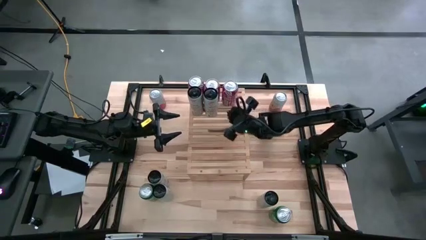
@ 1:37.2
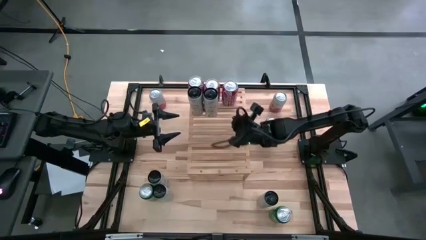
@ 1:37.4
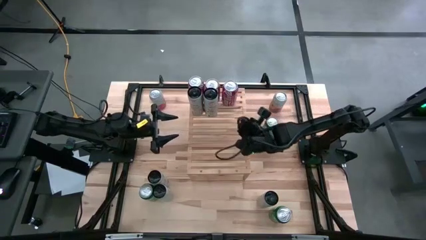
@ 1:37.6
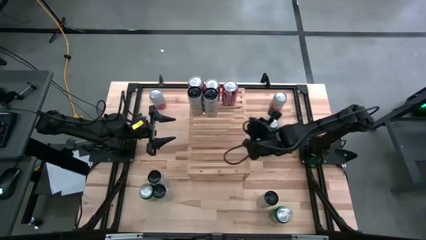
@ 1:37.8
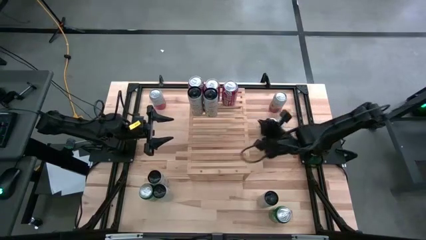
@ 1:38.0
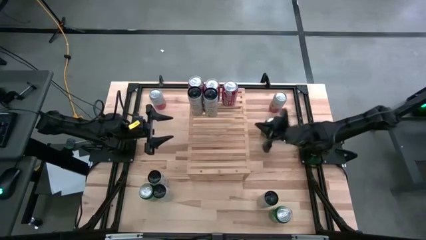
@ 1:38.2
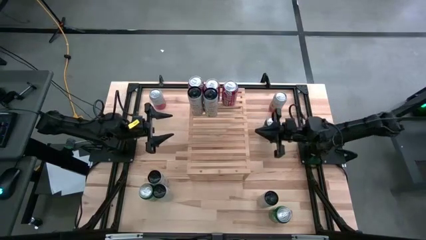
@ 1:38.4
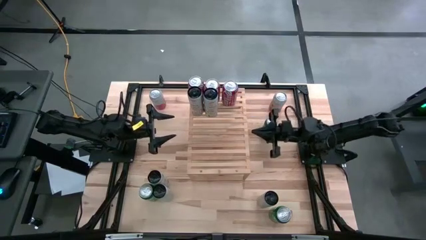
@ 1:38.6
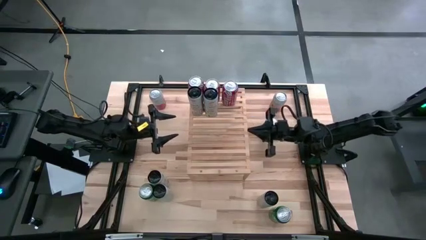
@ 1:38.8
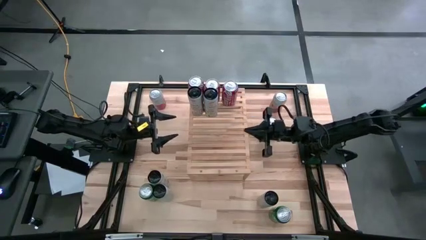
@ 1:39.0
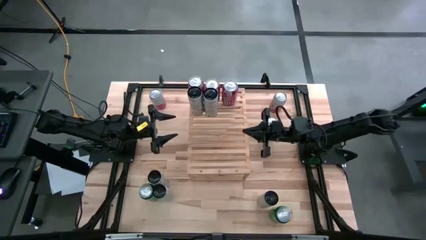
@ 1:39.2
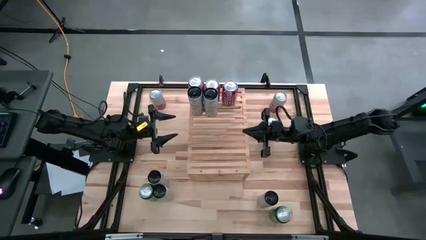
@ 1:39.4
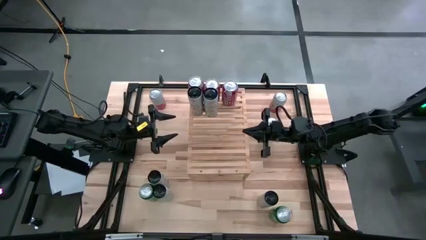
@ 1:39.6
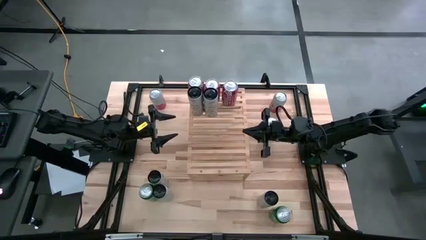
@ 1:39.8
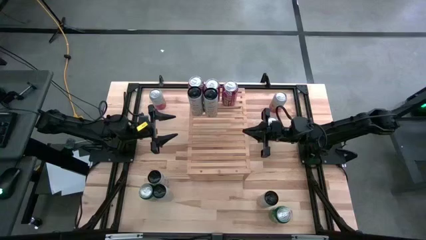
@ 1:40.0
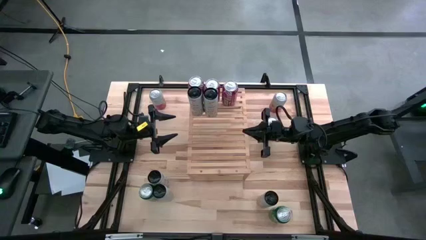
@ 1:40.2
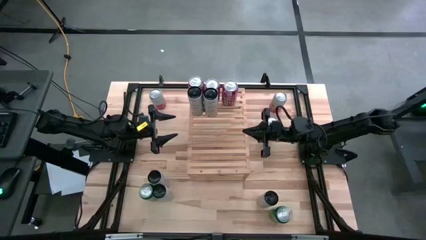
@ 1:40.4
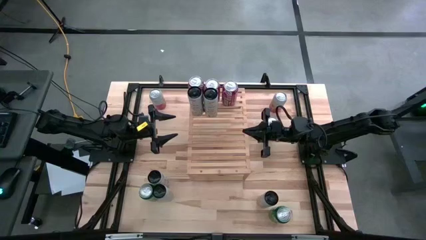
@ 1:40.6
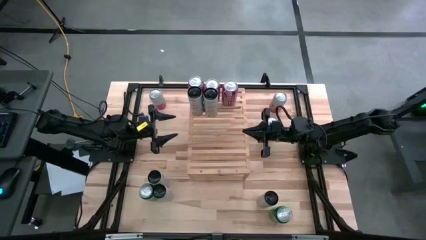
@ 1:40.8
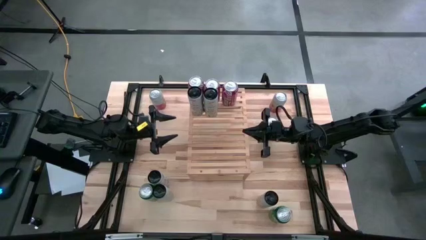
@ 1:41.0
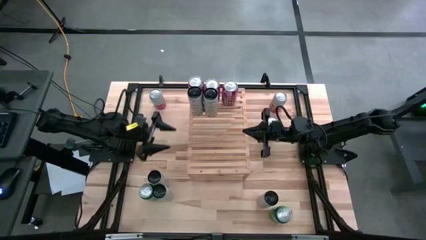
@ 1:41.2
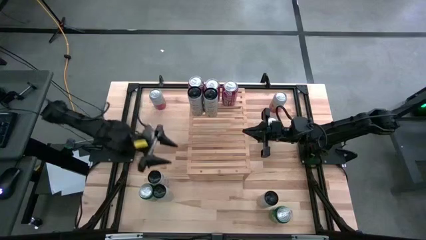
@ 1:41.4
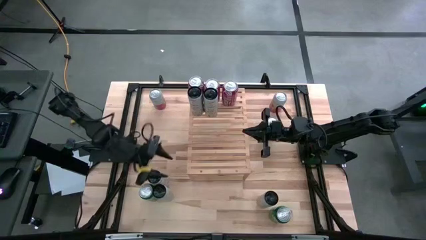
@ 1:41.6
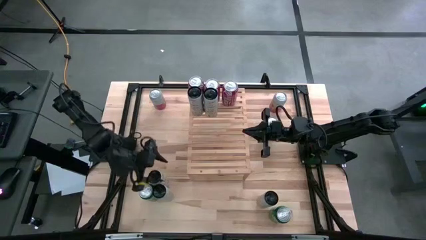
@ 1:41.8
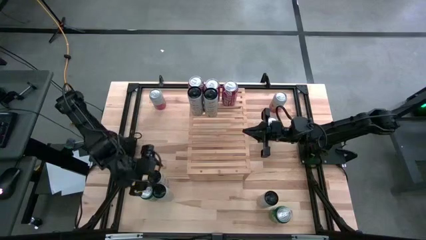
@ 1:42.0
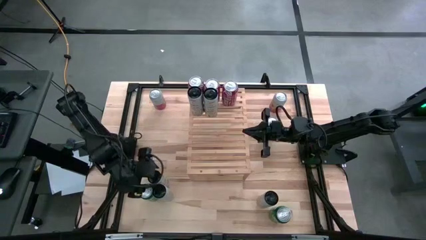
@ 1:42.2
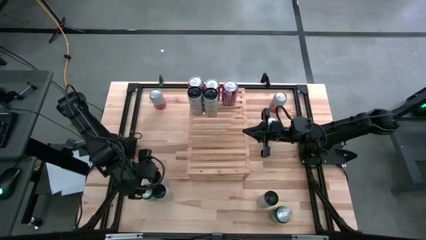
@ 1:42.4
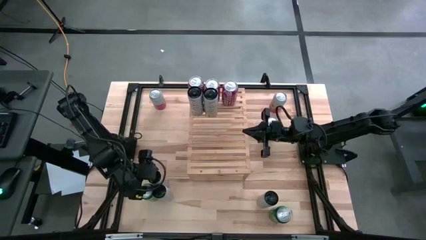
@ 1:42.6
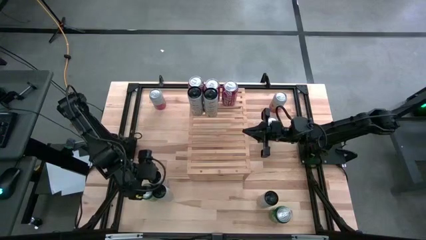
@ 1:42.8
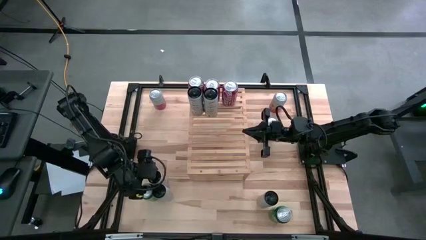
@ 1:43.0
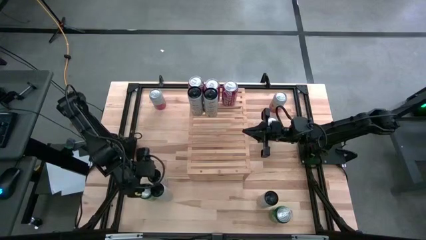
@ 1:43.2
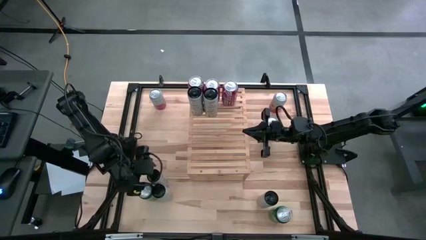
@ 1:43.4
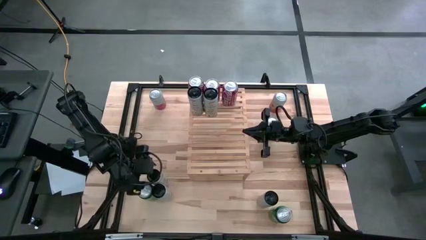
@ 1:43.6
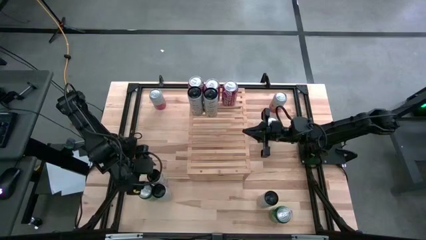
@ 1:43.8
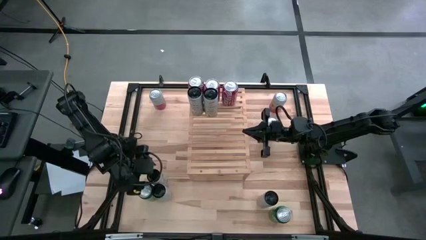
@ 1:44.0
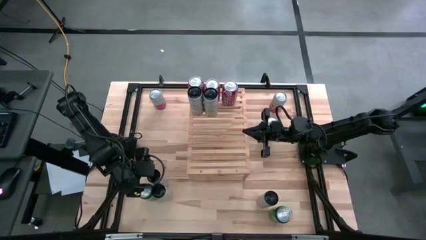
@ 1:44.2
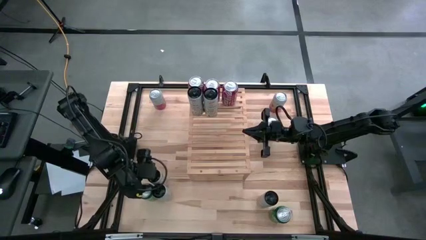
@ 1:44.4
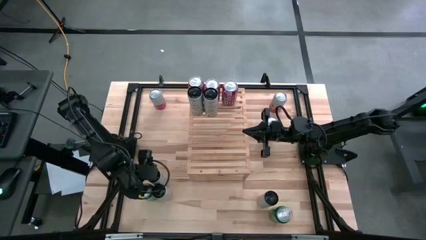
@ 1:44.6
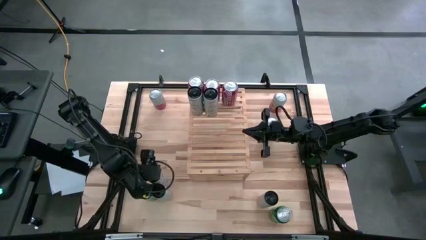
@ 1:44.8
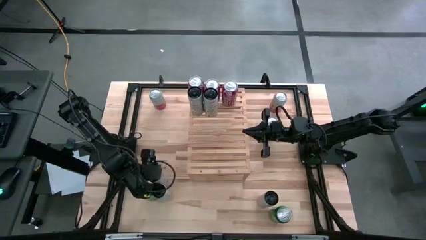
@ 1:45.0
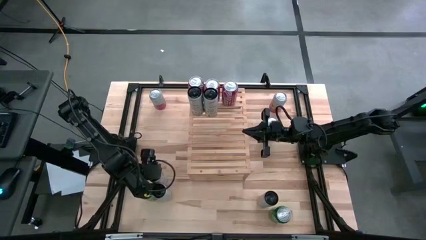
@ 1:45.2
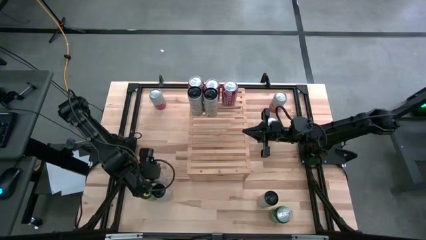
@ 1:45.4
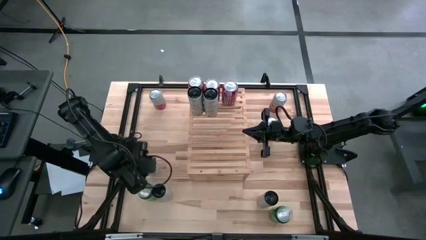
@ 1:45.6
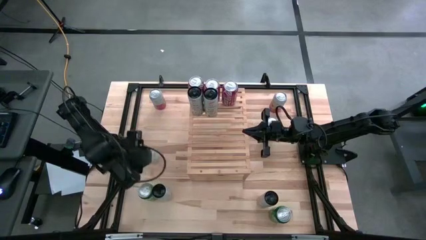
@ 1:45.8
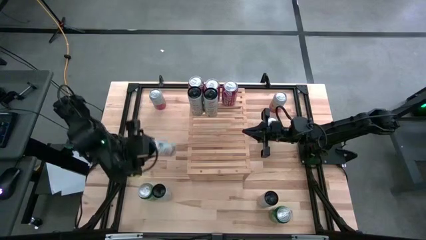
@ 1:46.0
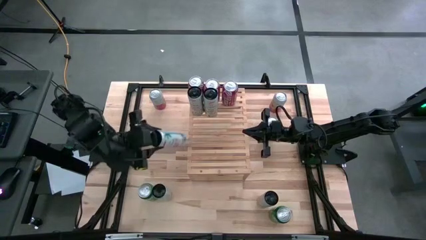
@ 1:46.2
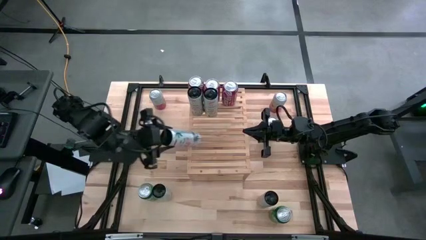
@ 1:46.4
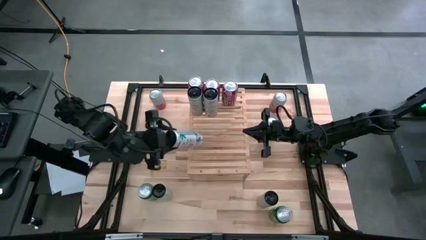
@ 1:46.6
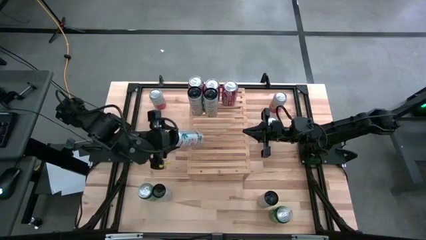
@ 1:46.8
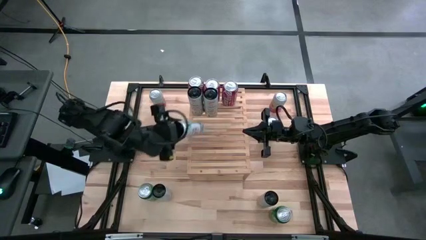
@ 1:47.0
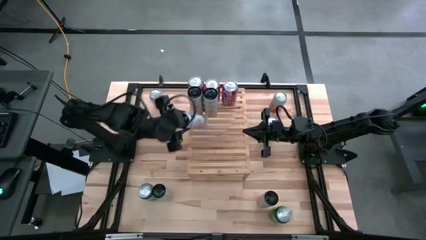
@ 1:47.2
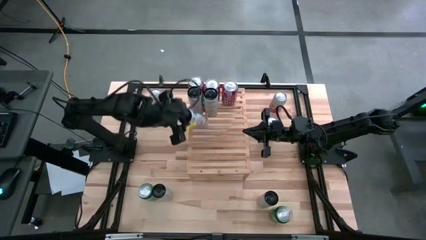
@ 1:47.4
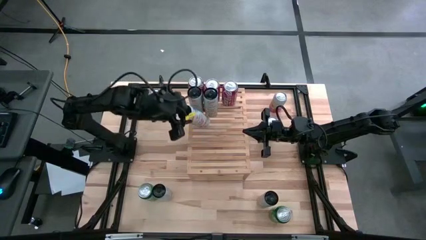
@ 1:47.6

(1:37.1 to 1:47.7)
Task: Place canned beverage on shelf
Align the bottom left peach vibe celsius soda can with the other tropical celsius soda can on the shelf

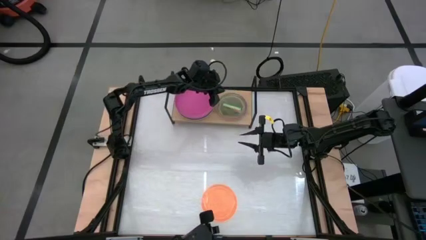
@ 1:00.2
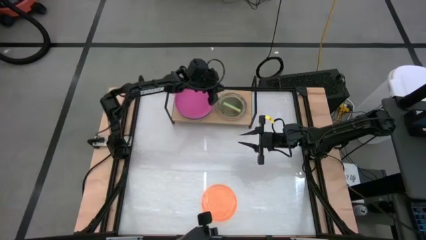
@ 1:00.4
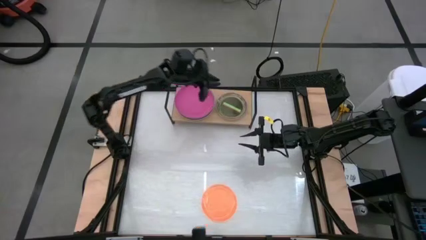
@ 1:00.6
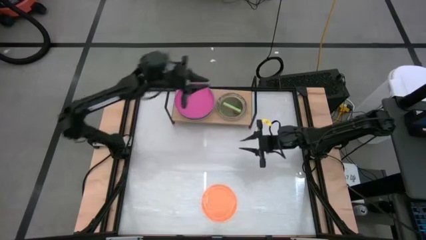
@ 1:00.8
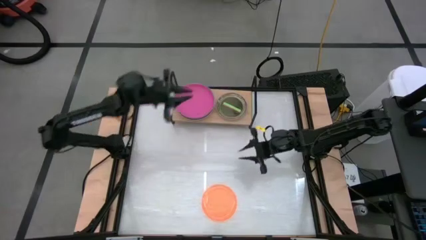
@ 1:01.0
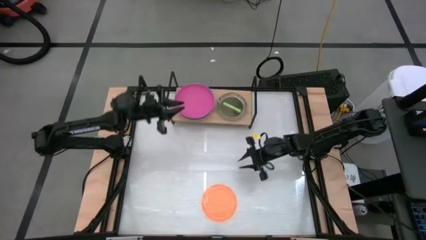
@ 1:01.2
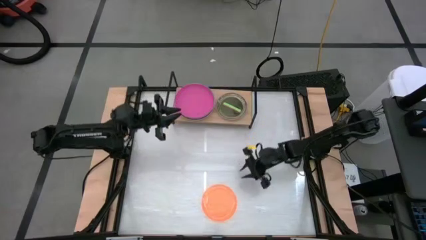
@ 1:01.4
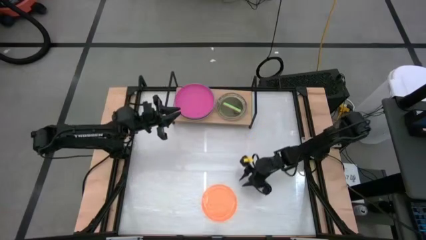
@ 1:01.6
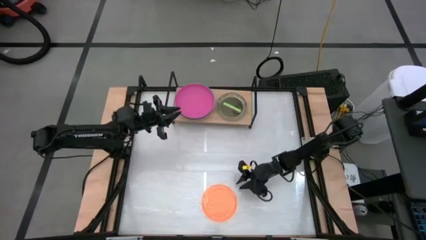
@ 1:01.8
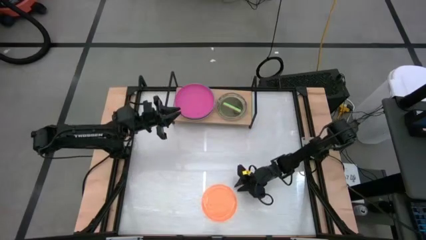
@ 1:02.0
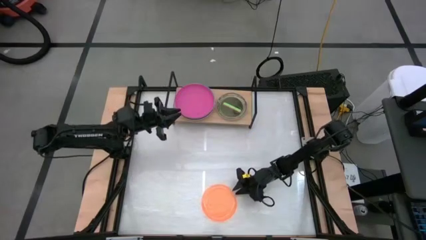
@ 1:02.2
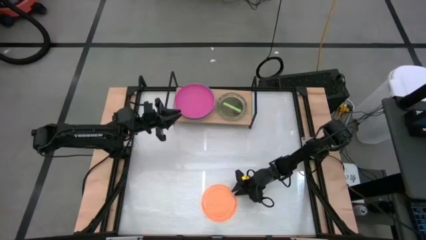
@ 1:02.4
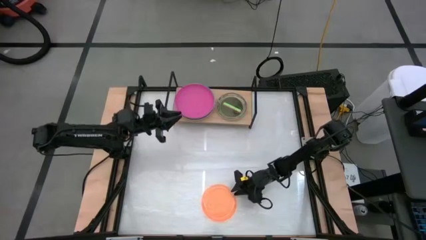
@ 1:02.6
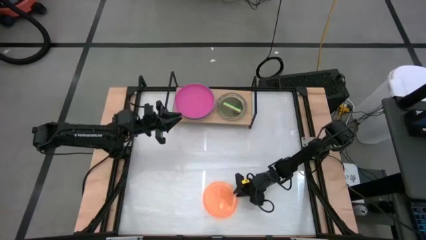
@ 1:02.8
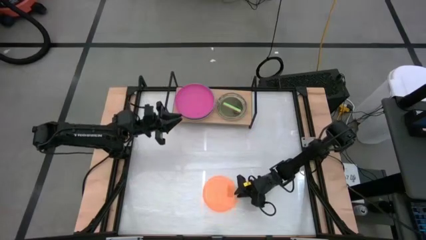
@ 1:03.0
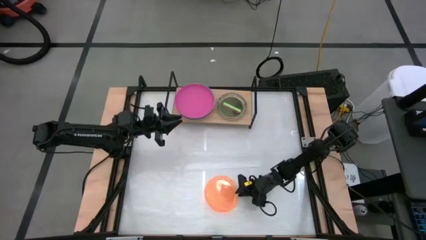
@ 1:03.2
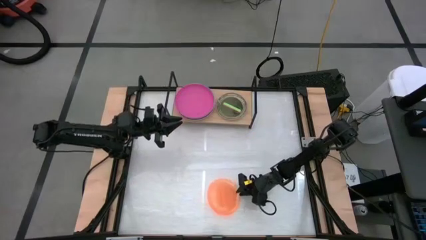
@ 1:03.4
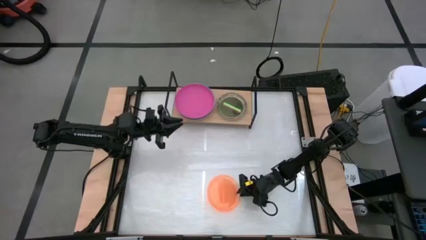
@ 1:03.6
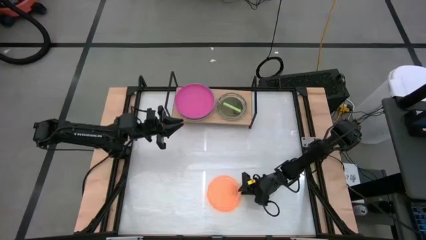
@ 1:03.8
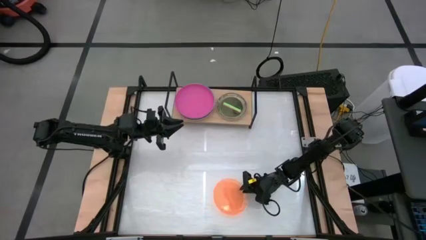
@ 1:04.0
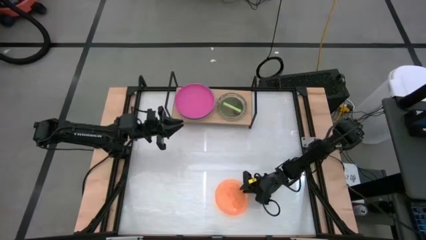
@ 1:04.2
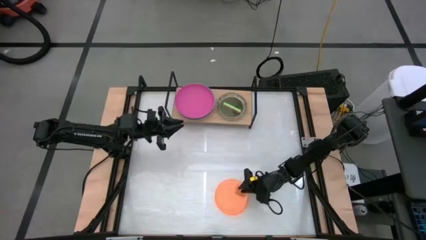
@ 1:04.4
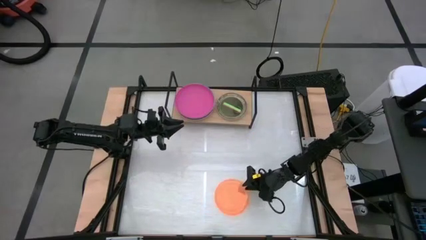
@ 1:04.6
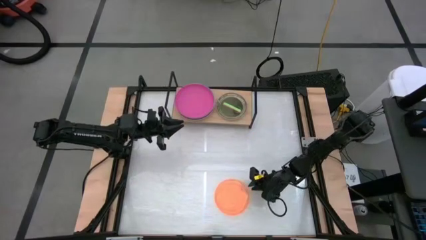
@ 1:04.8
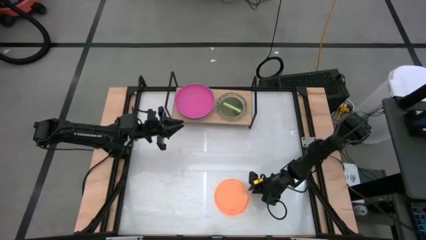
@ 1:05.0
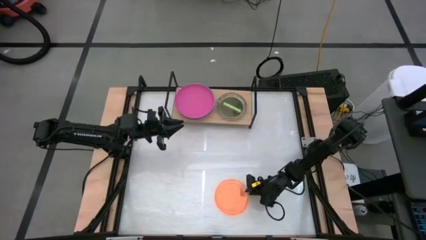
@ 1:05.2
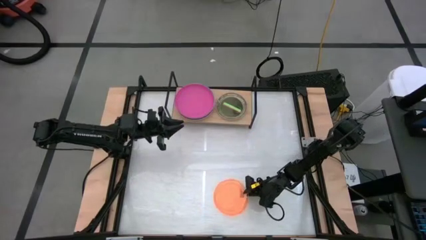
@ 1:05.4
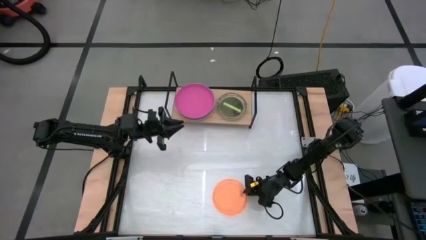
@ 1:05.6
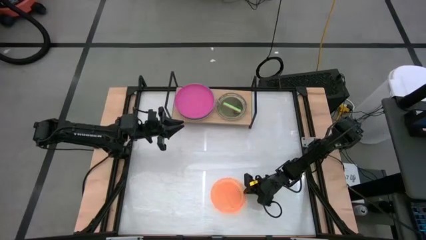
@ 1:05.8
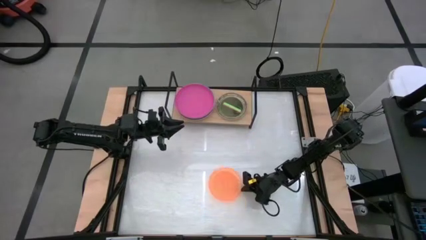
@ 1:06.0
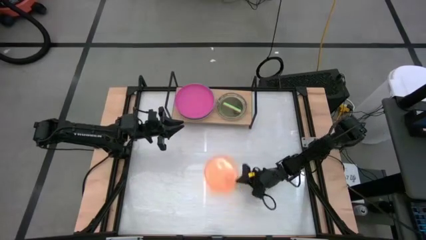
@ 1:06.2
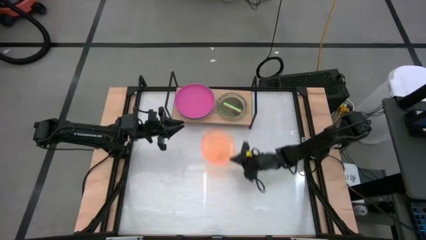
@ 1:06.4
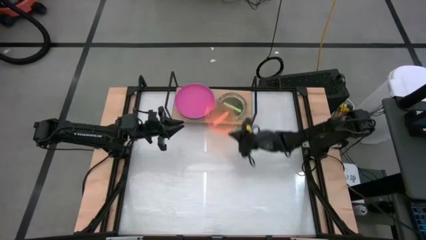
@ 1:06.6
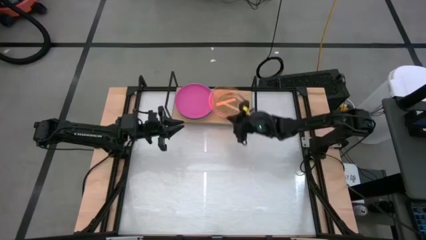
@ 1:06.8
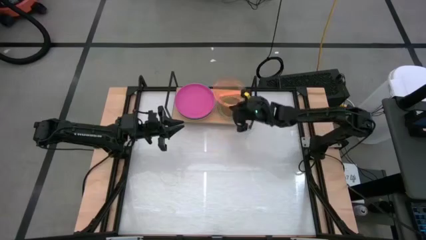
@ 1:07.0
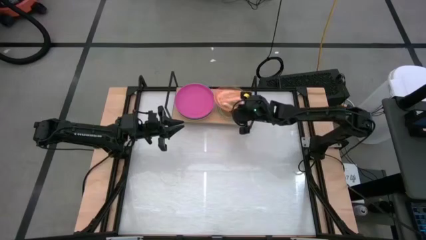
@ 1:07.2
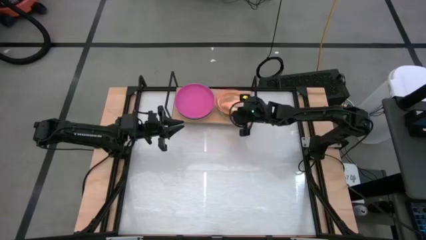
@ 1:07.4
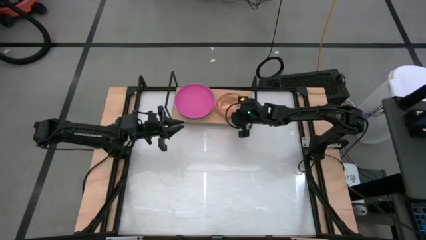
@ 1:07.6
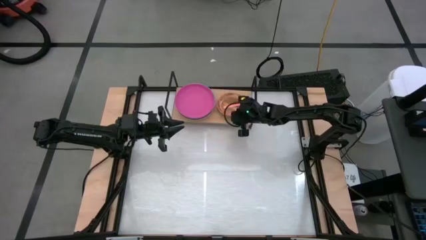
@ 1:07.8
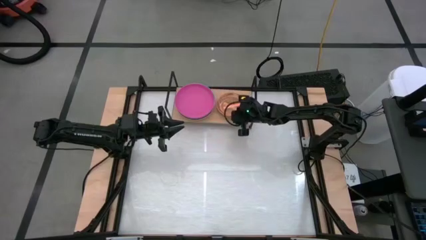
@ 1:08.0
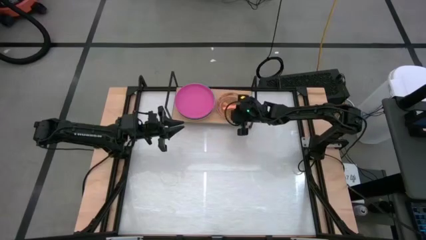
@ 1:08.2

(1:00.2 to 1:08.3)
Task: Place and stack plates onto a shelf
Stack the transparent orange plate on top of the transparent green plate on the shelf
